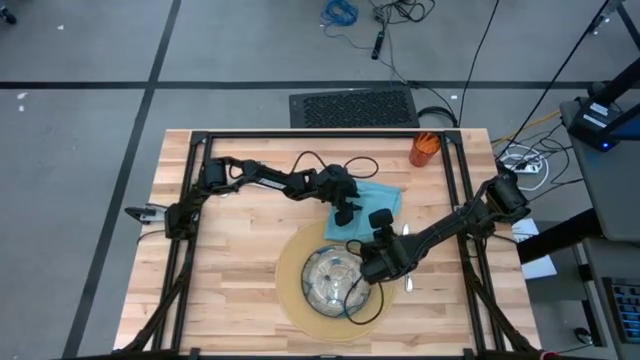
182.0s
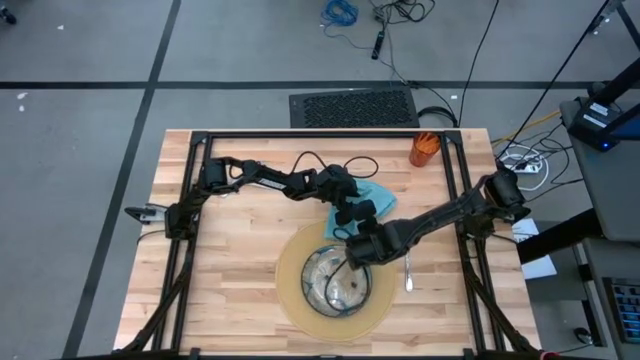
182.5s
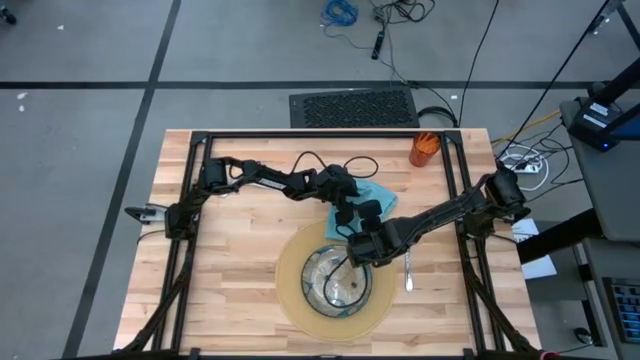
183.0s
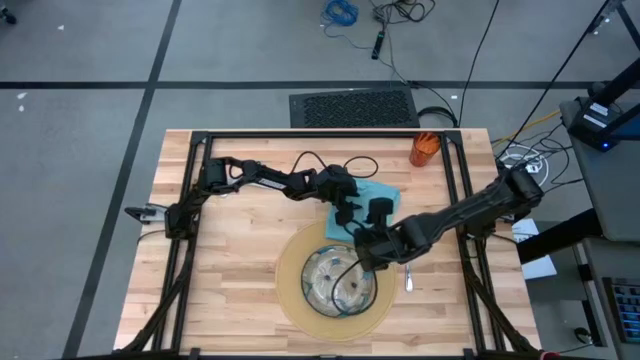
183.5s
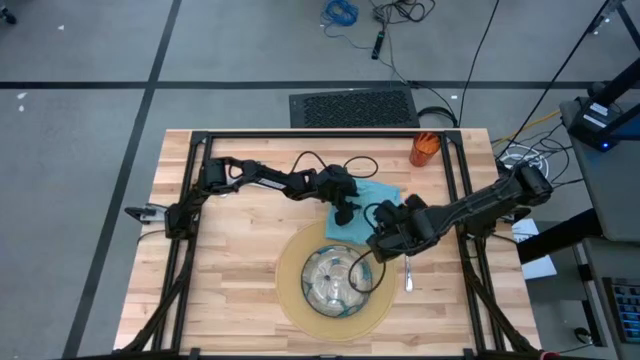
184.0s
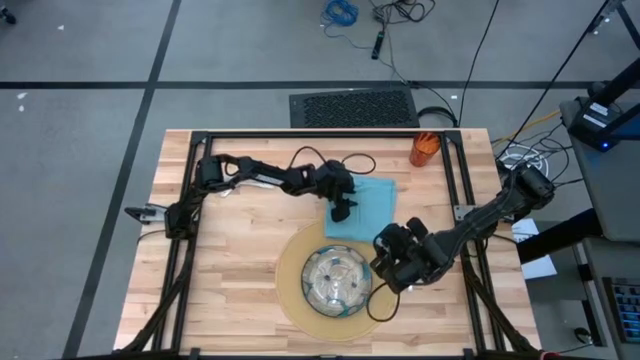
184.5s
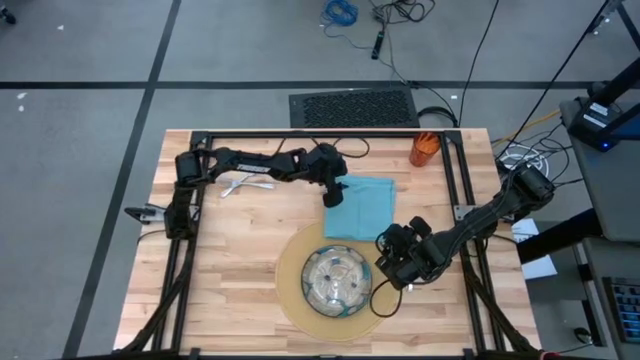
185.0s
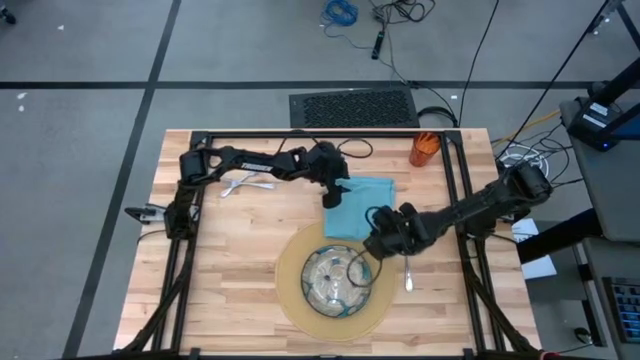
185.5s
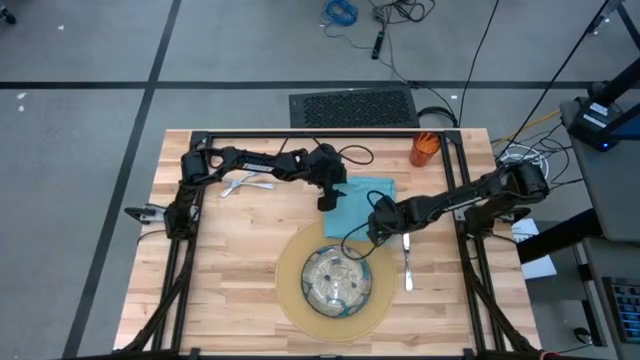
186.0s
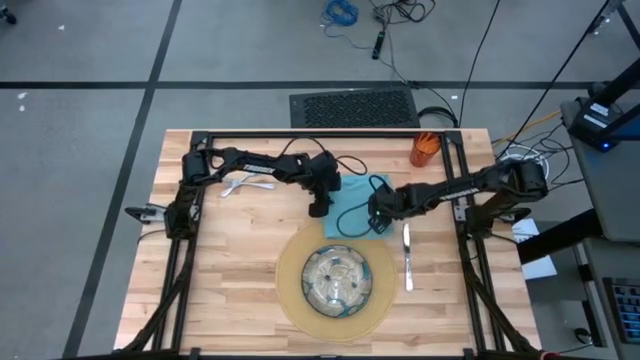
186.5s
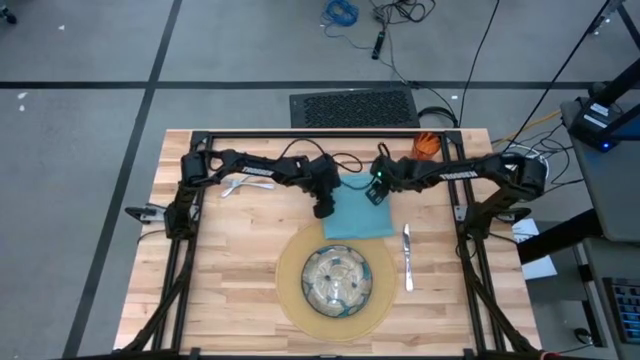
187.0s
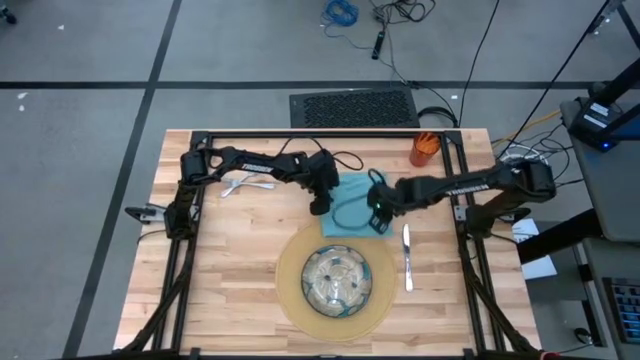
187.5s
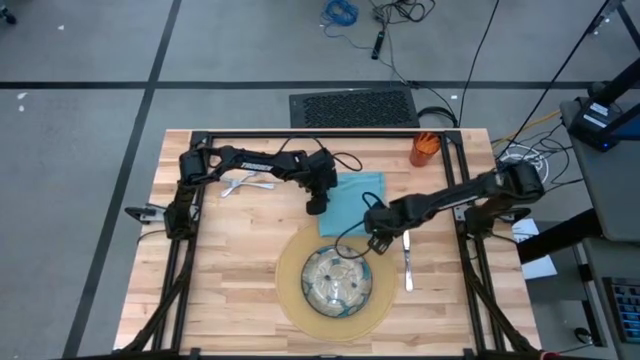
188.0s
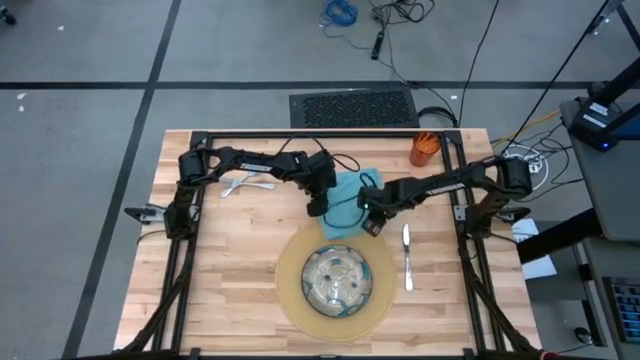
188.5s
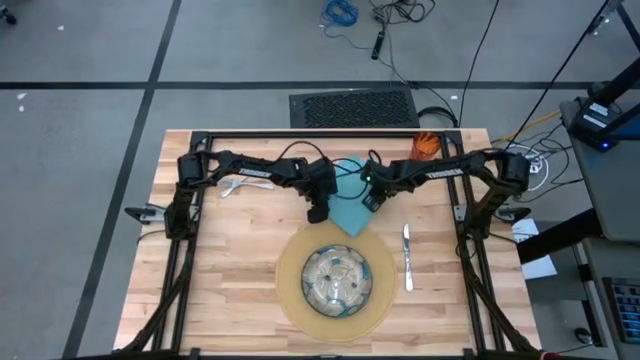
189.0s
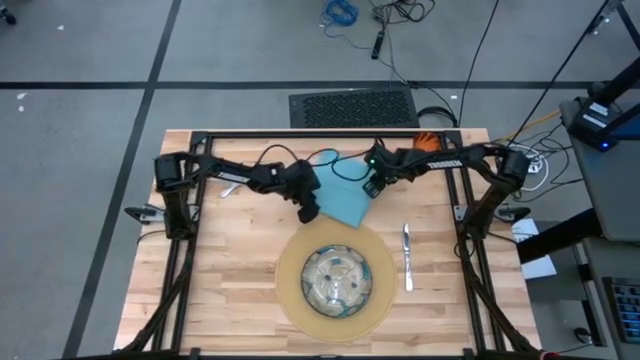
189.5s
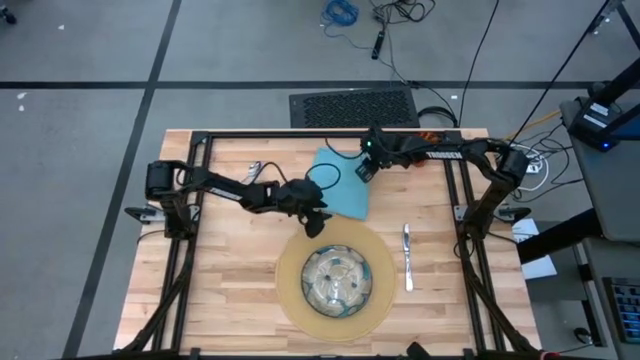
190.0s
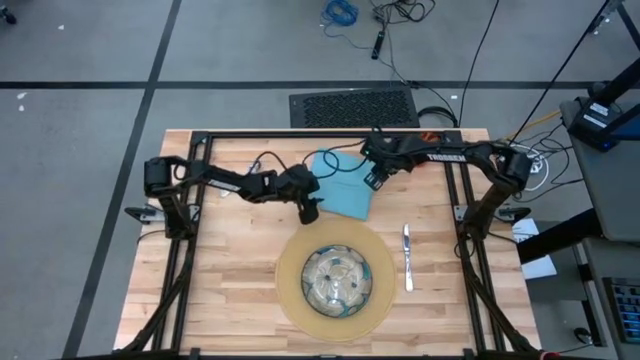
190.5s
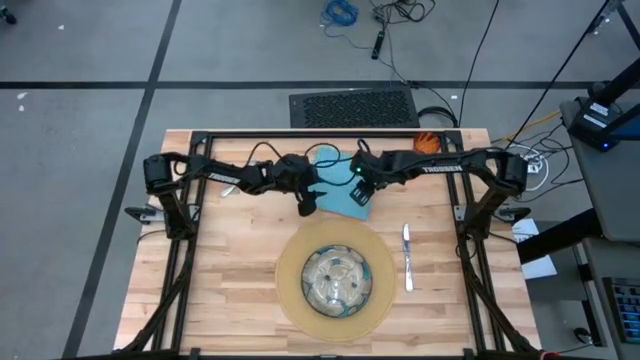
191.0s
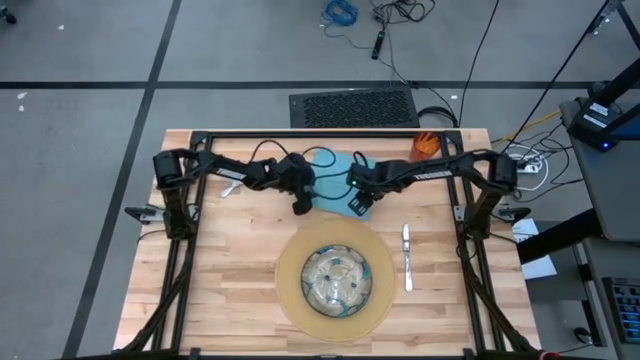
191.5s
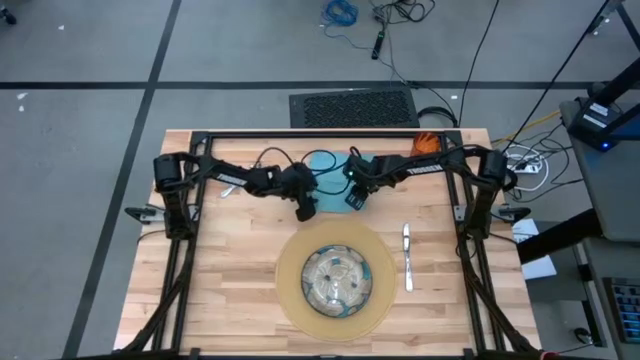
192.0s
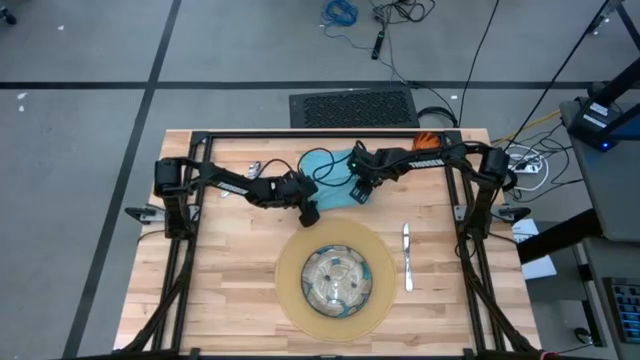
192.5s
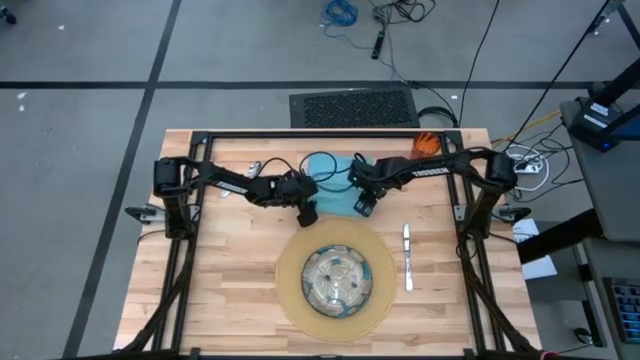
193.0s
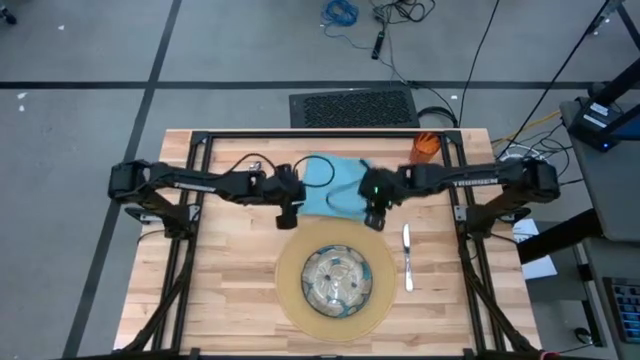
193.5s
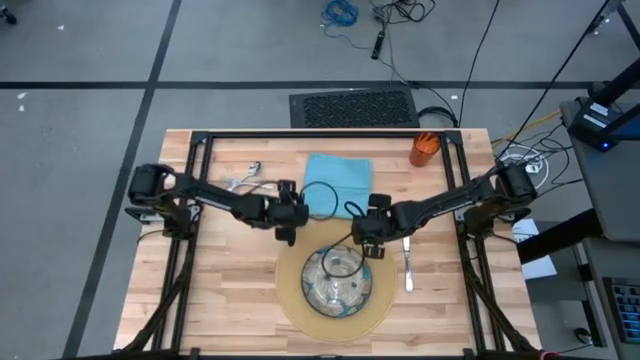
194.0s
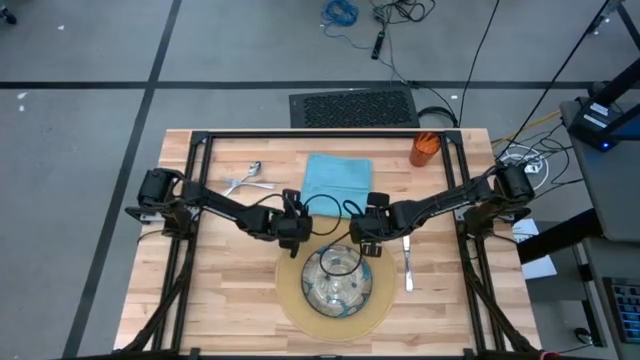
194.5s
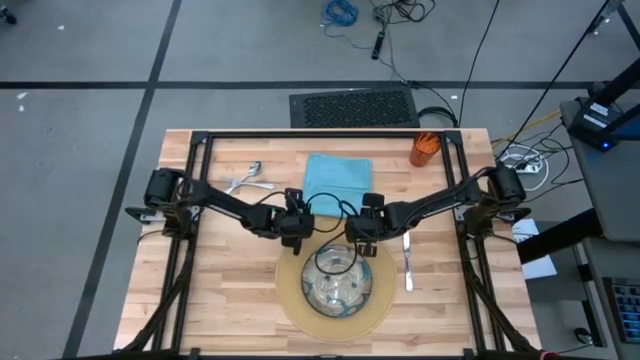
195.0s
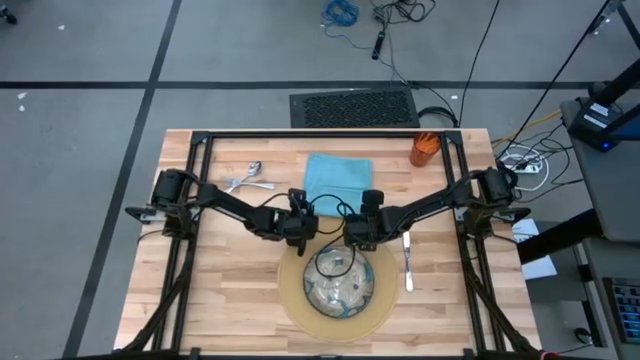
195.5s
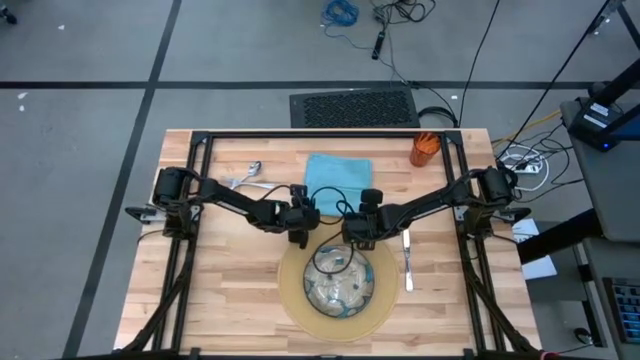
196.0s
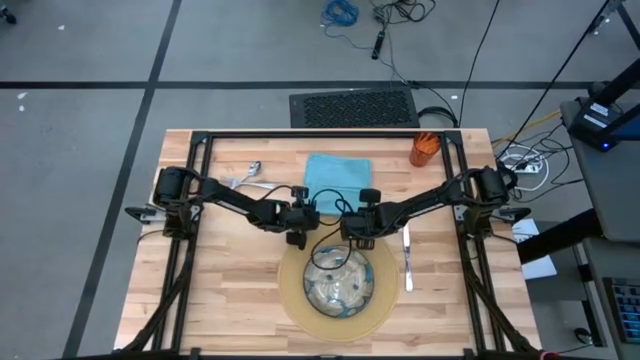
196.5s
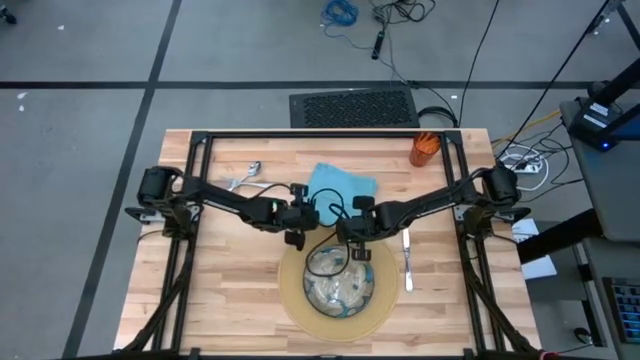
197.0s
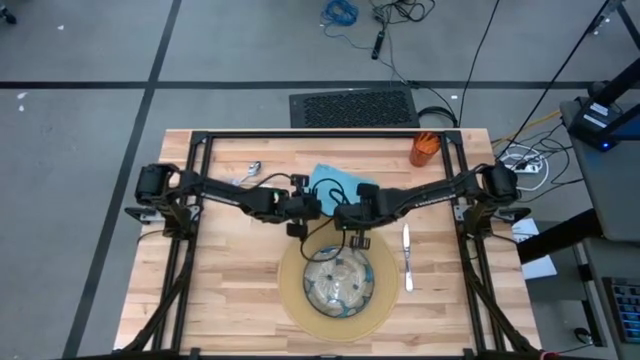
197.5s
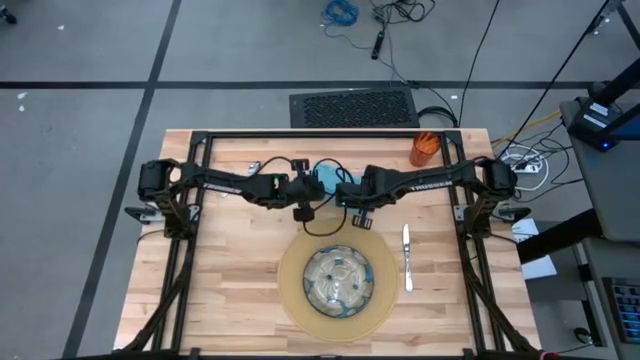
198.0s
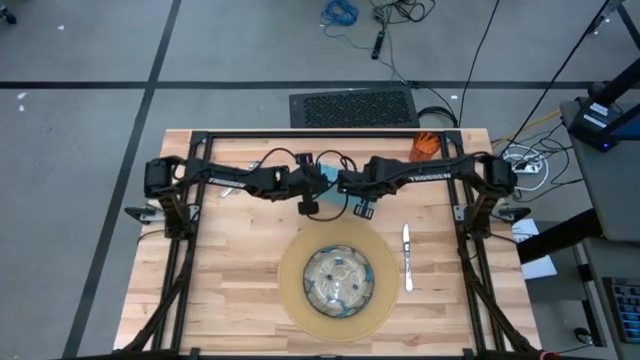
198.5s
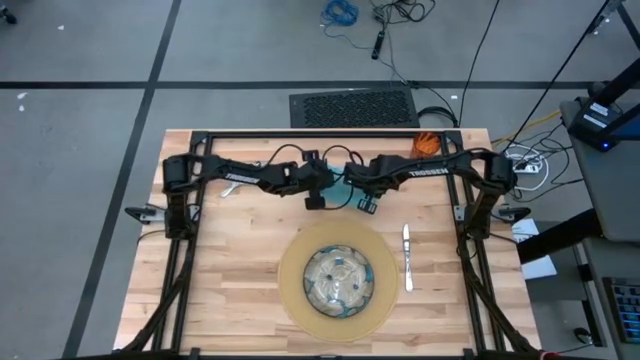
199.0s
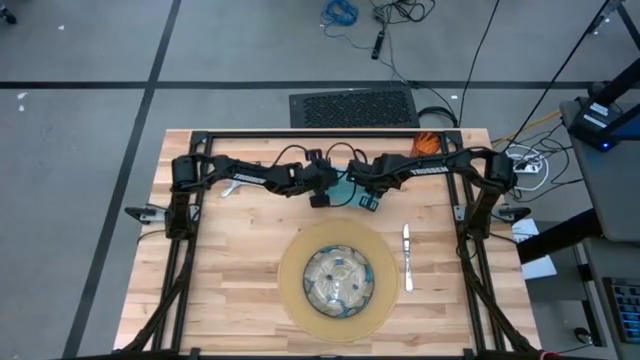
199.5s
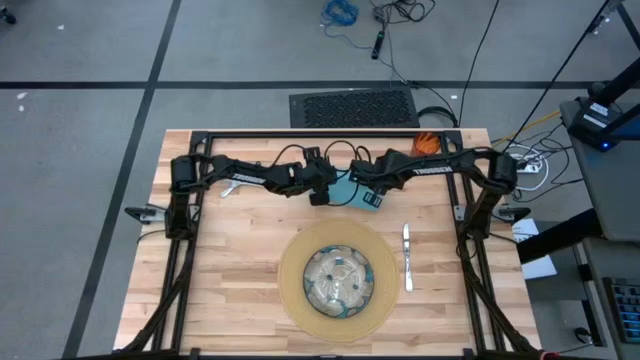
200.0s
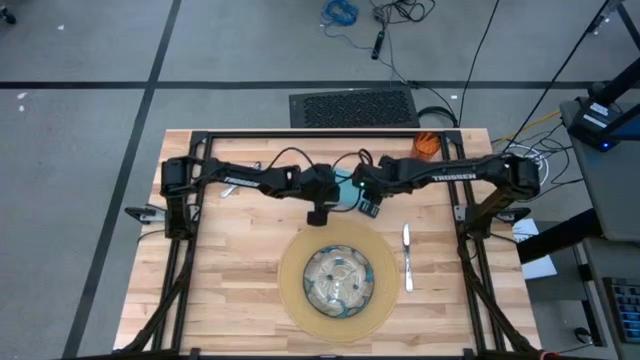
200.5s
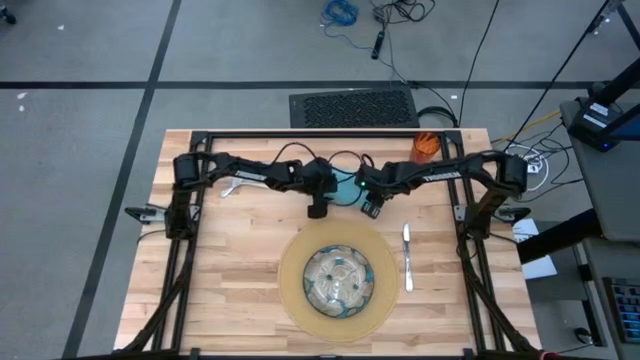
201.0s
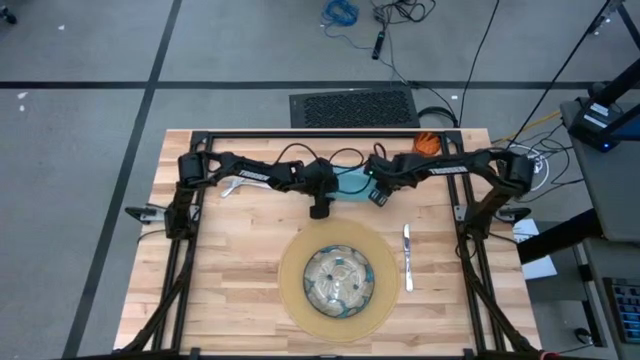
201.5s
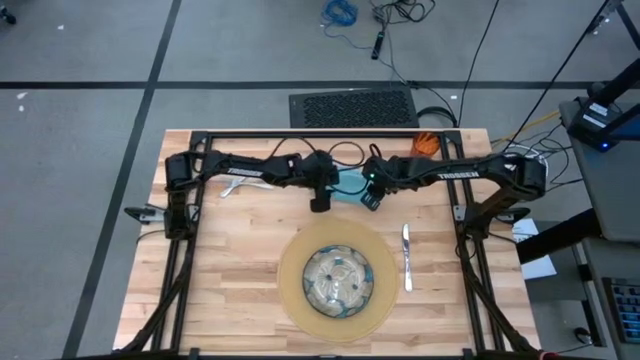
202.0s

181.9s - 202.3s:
Task: Set table place
Fold the blue napkin
